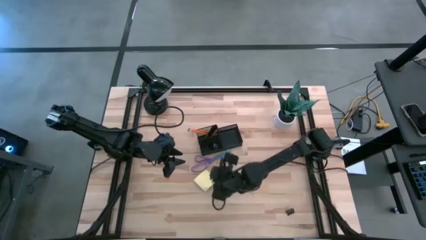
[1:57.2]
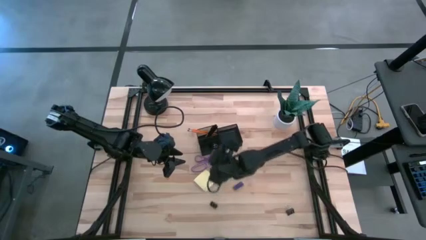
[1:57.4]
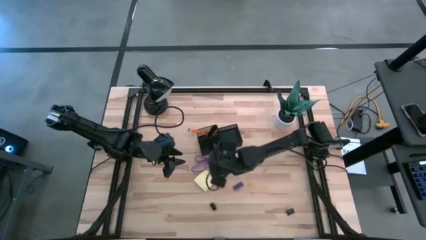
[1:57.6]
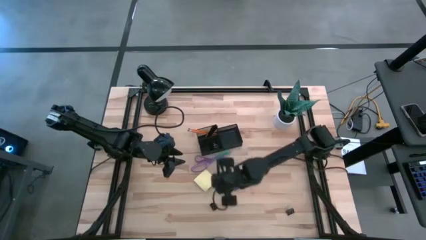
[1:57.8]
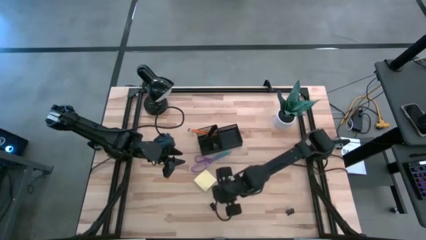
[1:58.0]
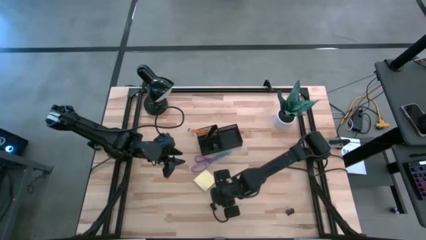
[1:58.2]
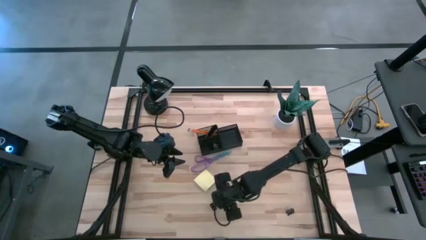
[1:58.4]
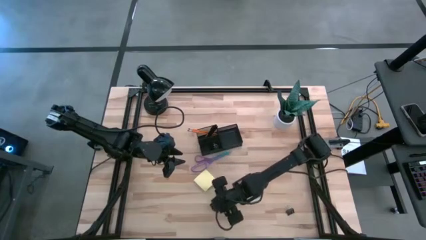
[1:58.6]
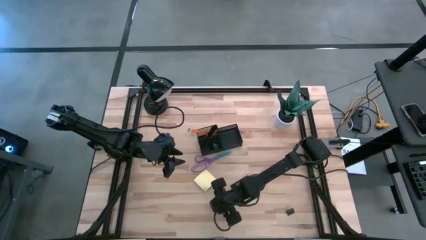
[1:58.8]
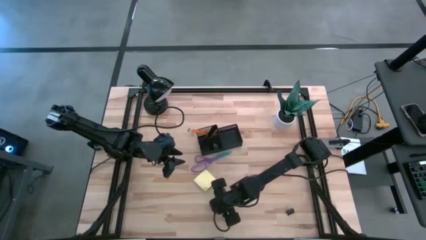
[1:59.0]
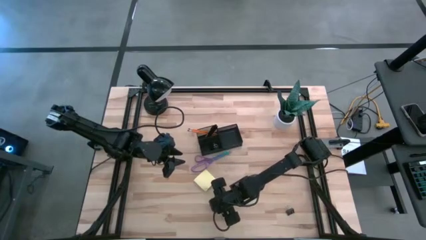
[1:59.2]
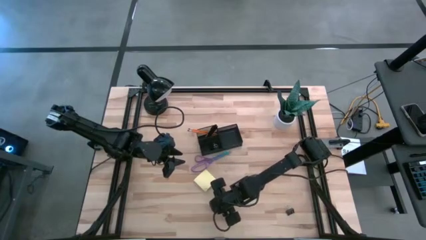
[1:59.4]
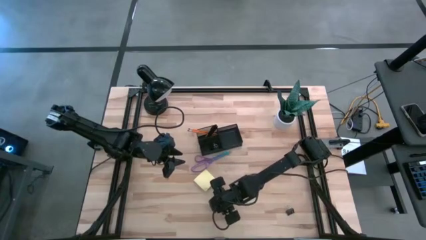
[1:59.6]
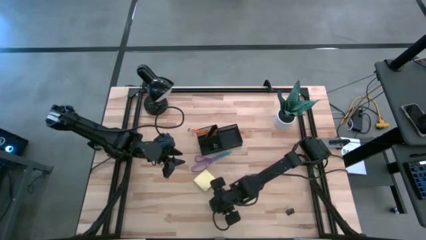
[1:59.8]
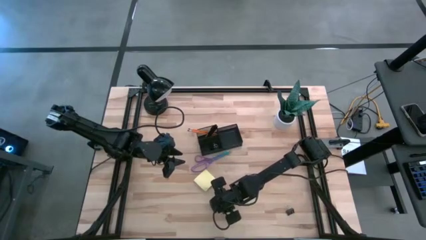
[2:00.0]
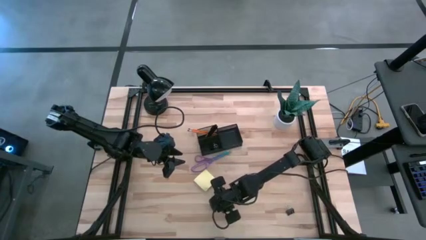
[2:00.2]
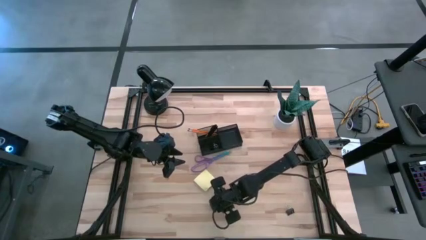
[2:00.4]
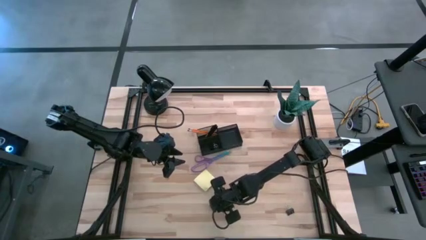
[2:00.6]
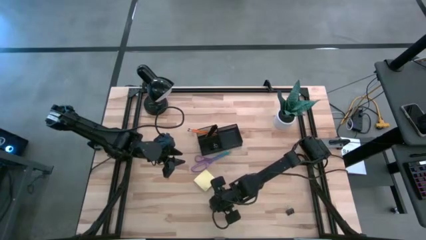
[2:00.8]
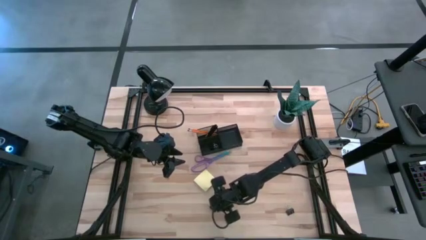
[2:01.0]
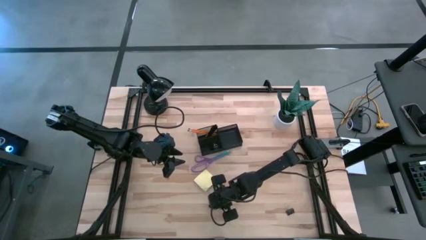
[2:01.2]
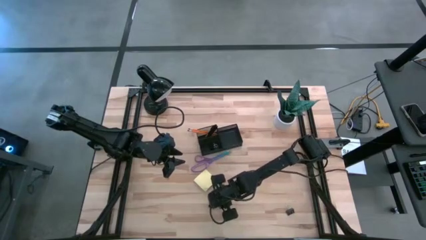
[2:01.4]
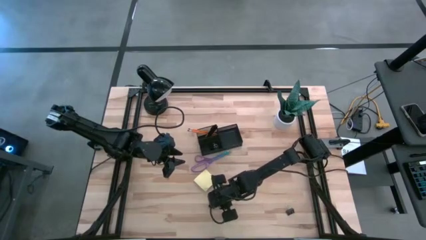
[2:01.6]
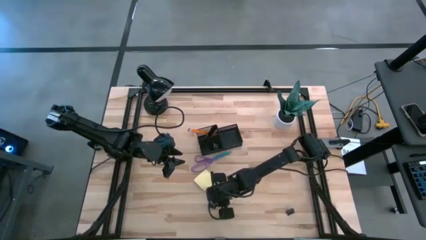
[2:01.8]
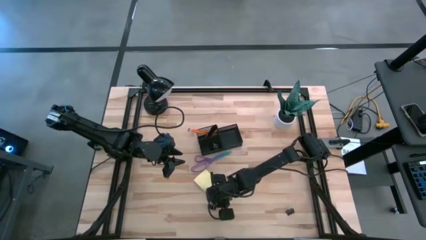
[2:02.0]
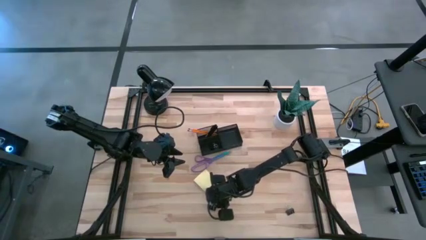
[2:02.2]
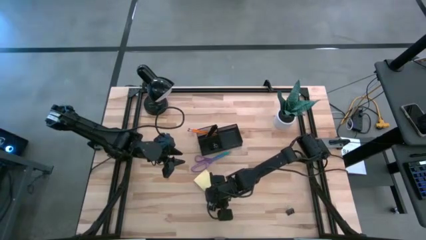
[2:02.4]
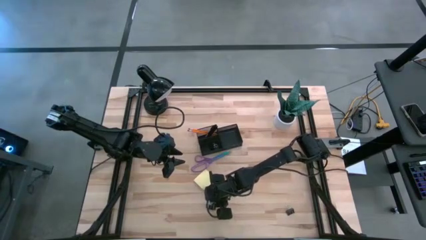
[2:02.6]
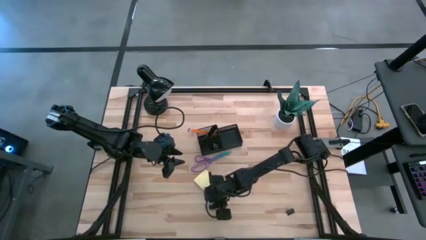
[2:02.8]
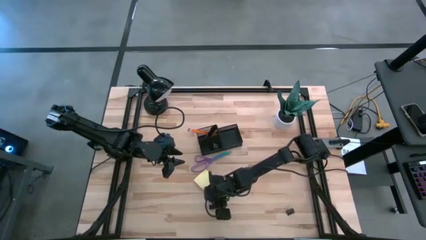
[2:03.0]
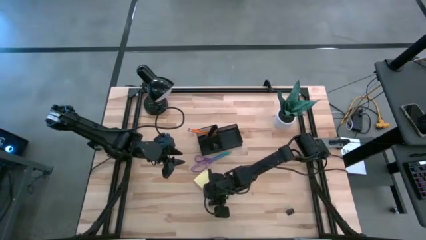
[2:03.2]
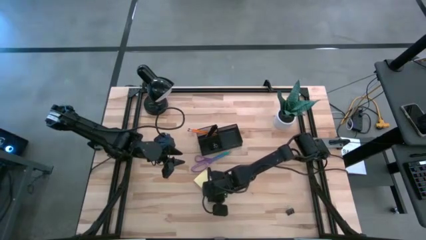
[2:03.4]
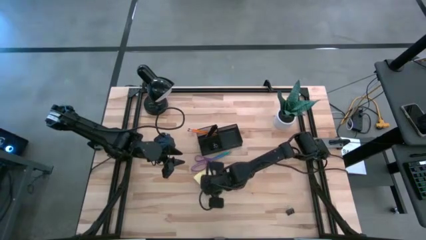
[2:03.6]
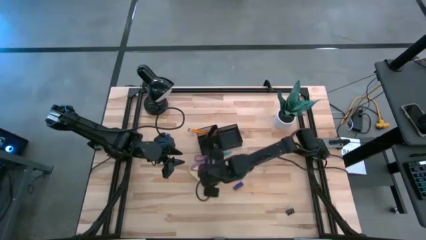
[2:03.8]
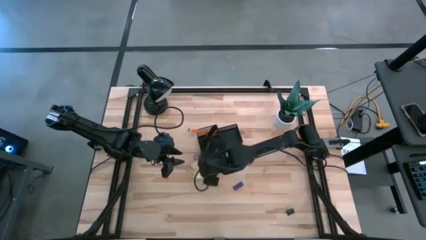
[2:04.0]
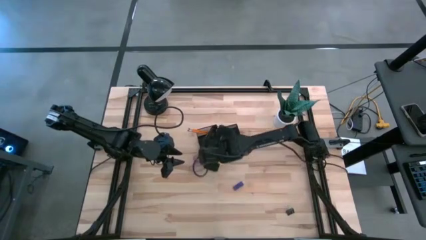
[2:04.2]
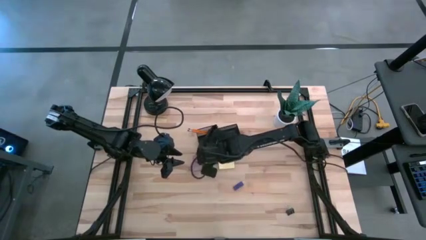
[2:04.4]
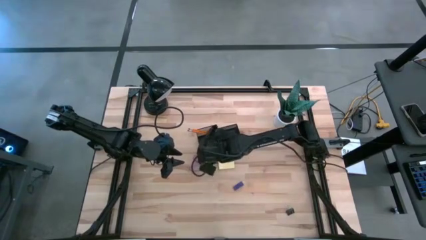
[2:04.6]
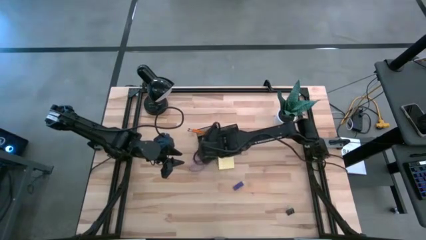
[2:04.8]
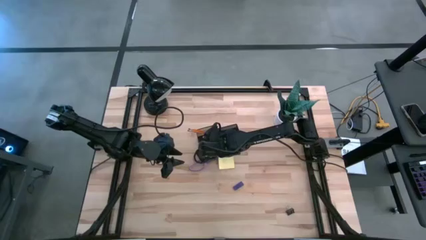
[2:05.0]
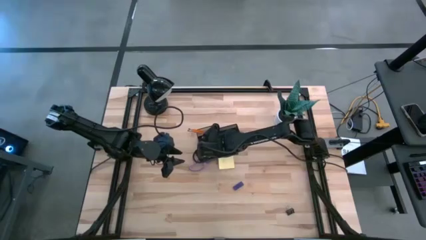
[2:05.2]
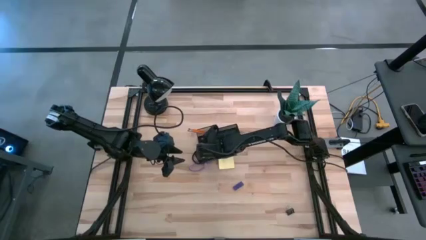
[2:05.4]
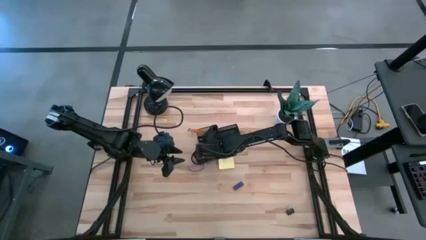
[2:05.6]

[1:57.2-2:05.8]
Task: Pick and place office supplies into organizer
Put the left black binder clip into the black desk organizer

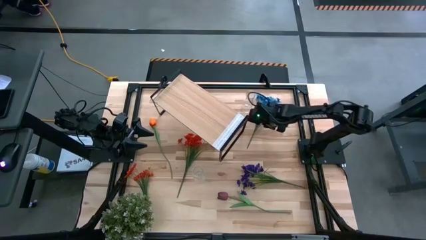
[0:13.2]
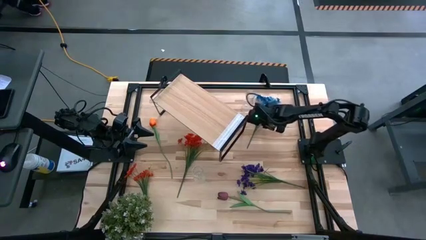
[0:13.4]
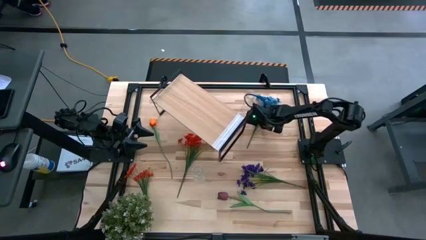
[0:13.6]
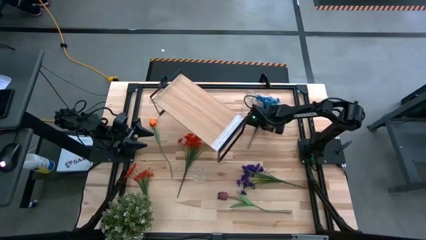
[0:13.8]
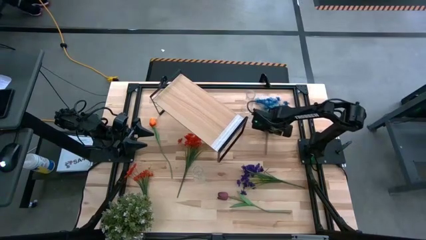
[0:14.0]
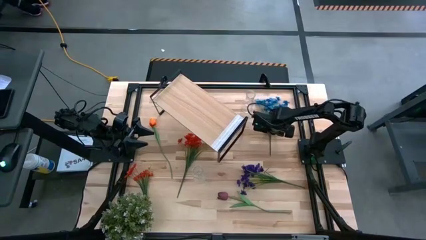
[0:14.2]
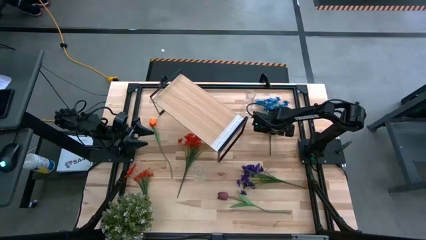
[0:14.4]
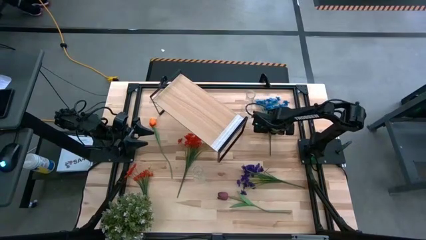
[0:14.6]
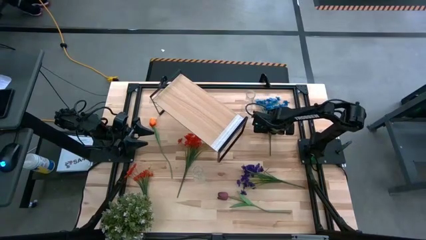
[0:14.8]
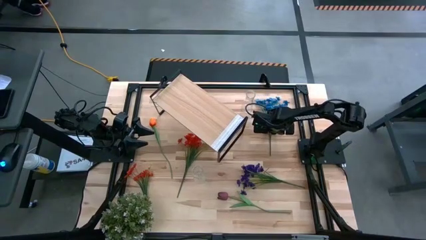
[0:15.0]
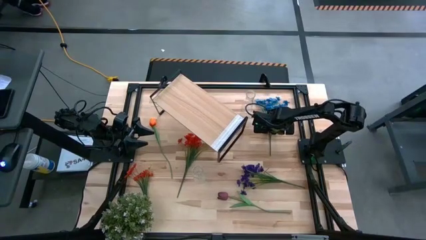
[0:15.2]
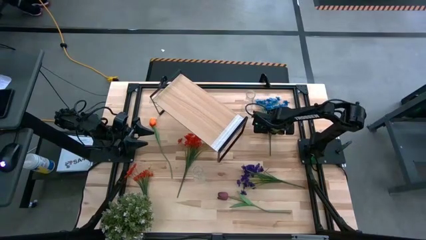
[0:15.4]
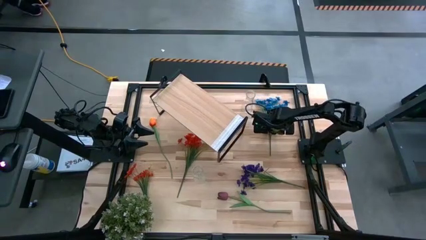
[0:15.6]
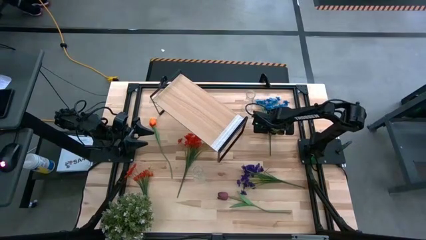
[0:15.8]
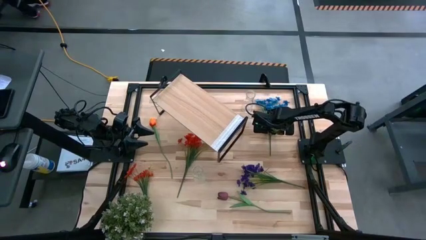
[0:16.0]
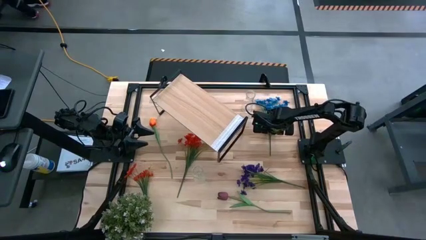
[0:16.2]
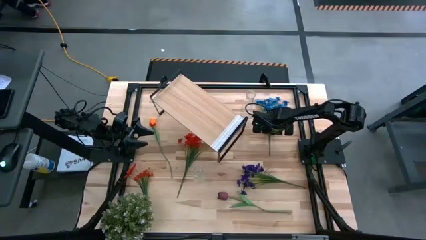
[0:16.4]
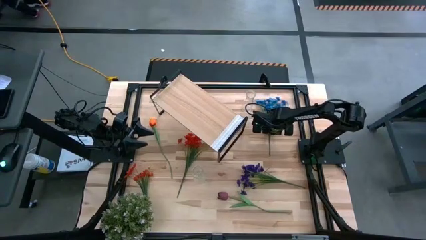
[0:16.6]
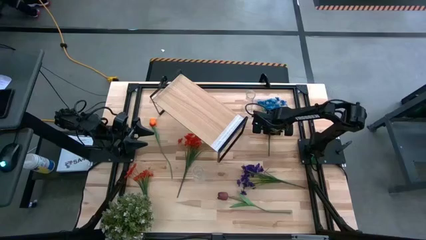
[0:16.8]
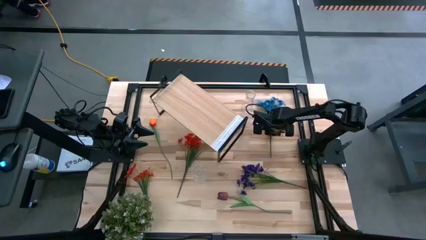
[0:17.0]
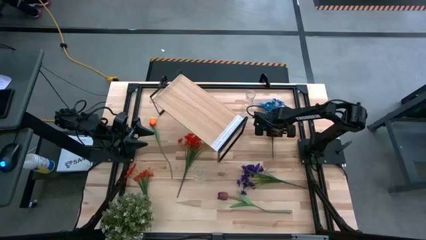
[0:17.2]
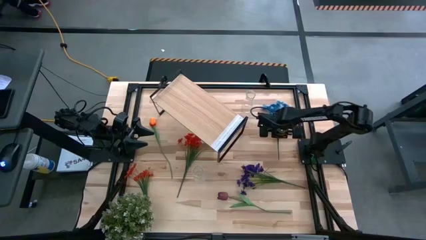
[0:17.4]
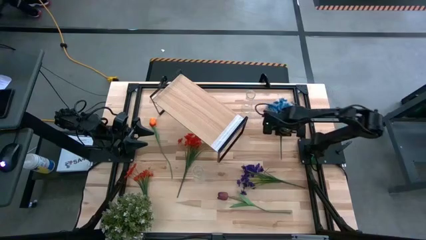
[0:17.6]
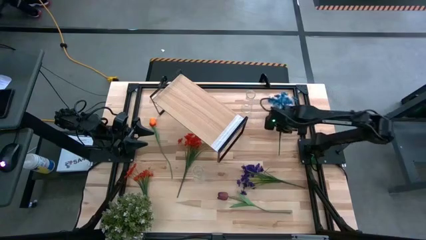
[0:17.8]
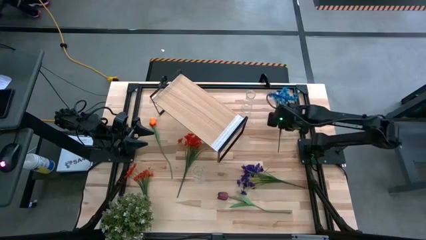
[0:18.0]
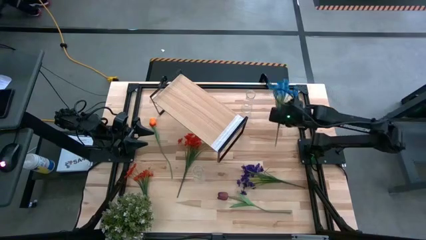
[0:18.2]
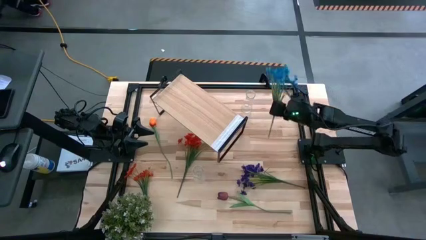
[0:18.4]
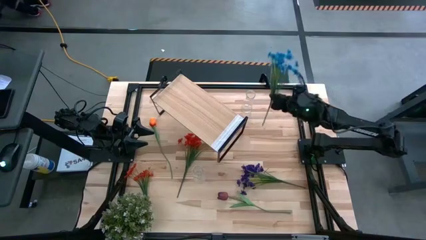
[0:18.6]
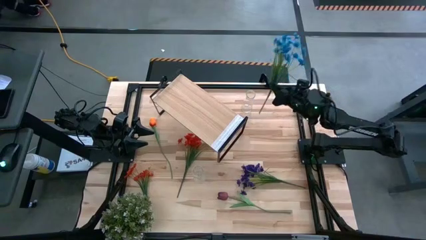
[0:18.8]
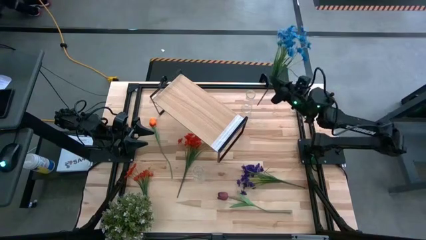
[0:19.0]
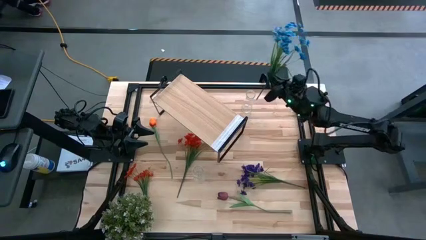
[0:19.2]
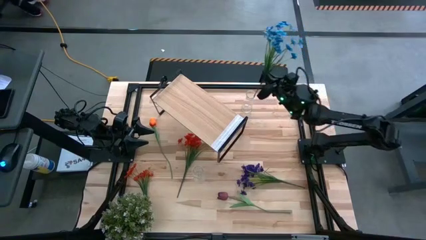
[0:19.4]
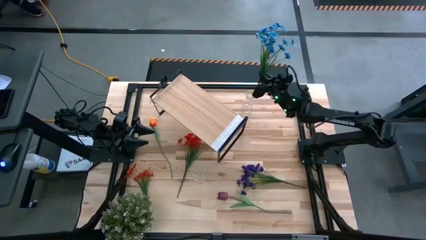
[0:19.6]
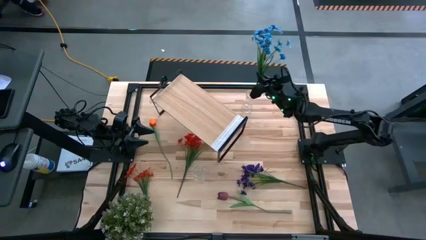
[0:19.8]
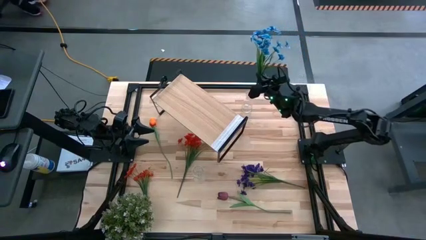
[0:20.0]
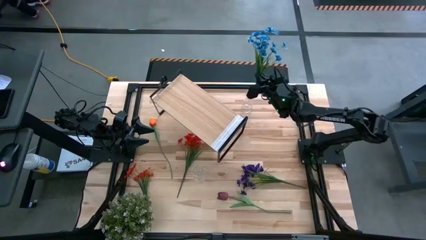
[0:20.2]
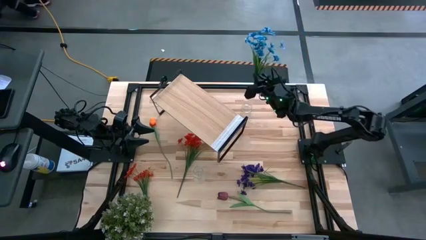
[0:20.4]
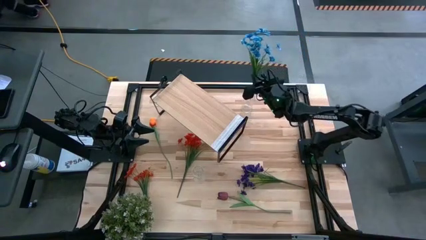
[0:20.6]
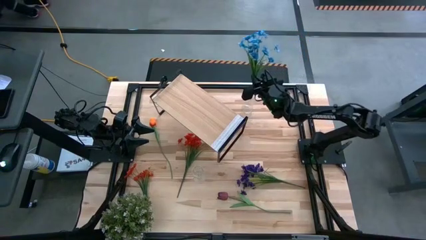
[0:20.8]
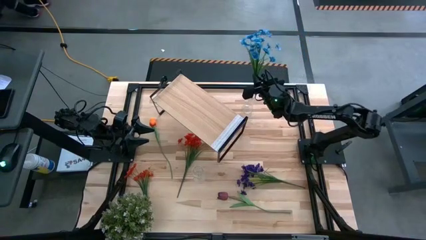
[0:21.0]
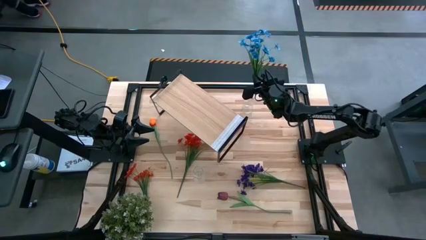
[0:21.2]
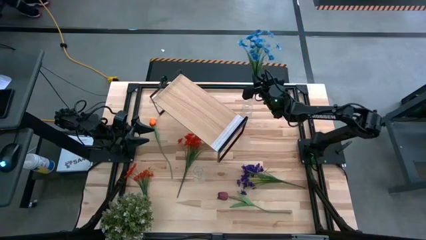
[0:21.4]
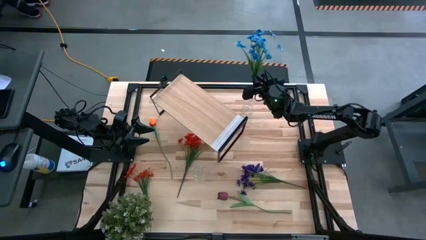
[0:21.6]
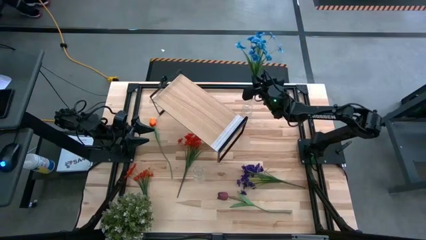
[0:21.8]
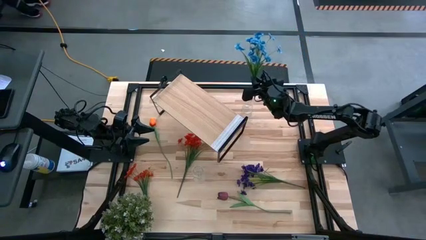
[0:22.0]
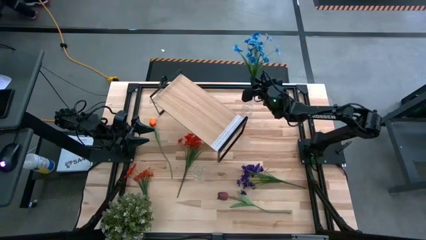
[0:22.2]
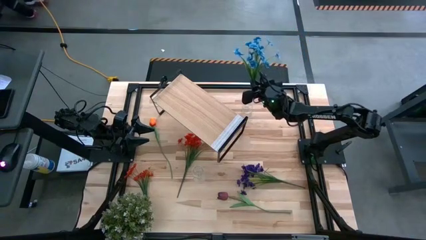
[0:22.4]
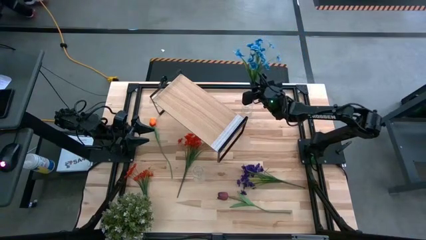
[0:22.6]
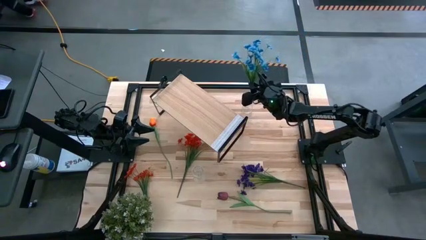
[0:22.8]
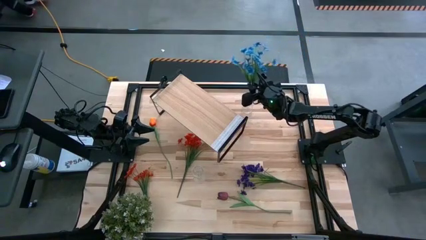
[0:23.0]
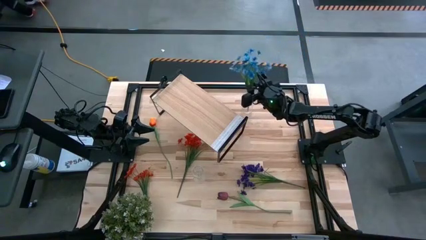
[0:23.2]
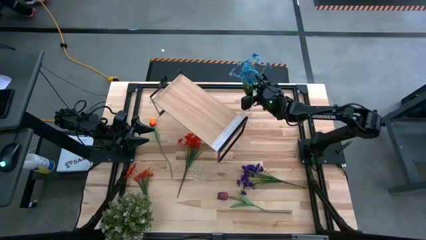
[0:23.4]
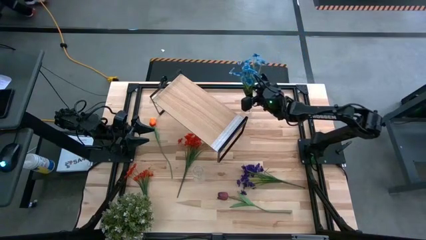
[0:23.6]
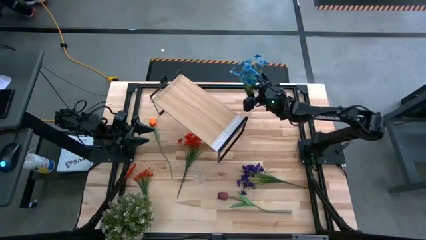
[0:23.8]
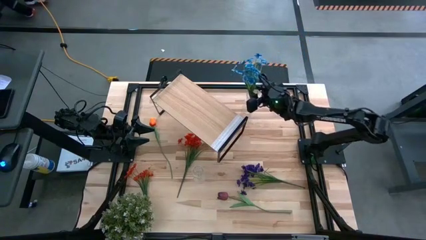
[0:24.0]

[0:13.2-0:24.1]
Task: Pick and place flowers into a vace then onto a shelf
Put the blue flowers into the top transparent flower vase
